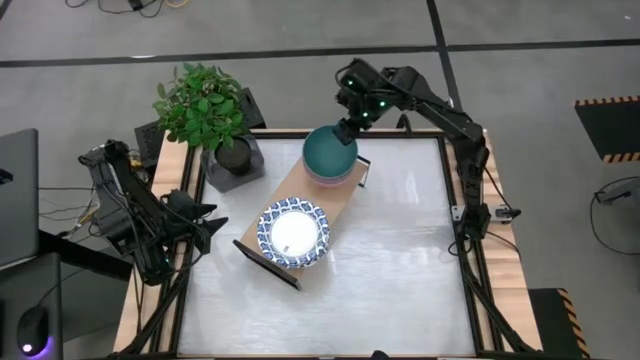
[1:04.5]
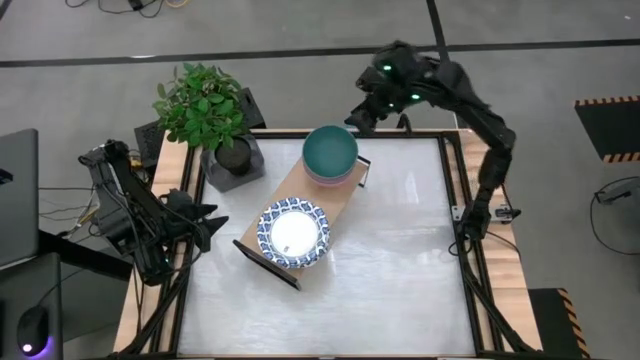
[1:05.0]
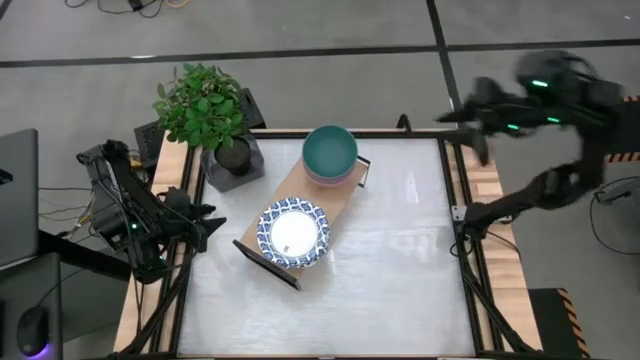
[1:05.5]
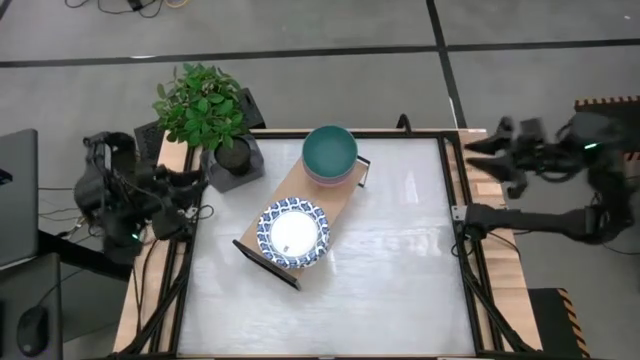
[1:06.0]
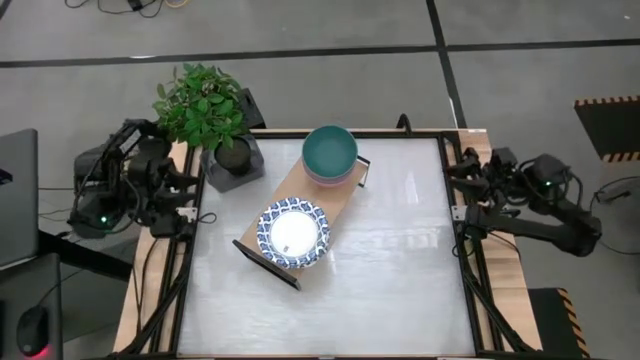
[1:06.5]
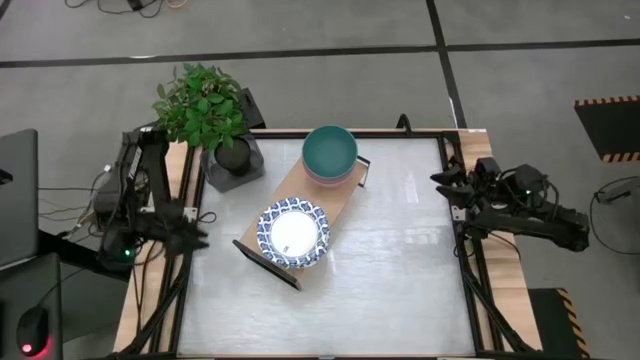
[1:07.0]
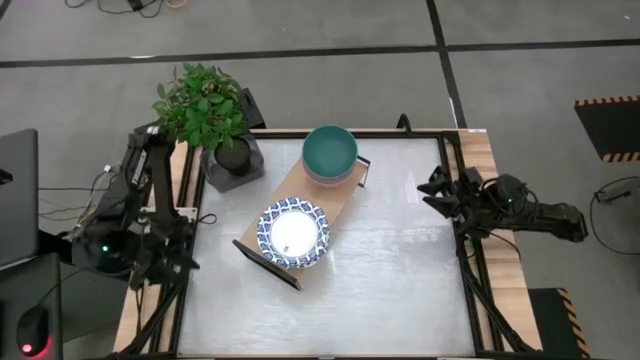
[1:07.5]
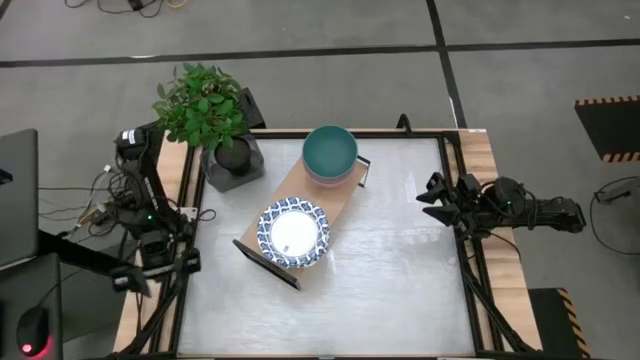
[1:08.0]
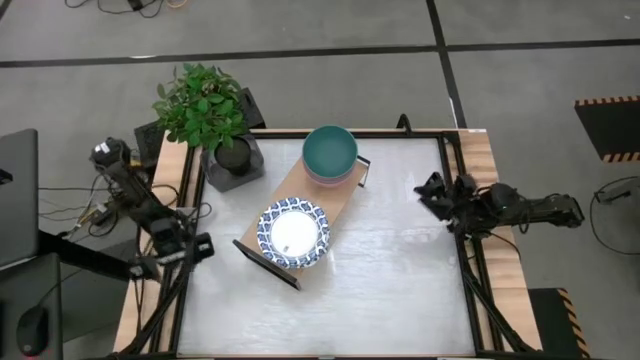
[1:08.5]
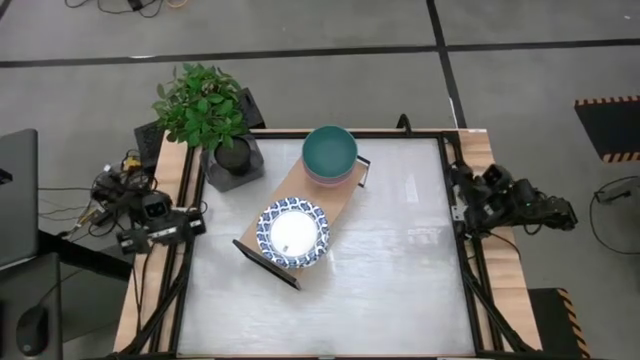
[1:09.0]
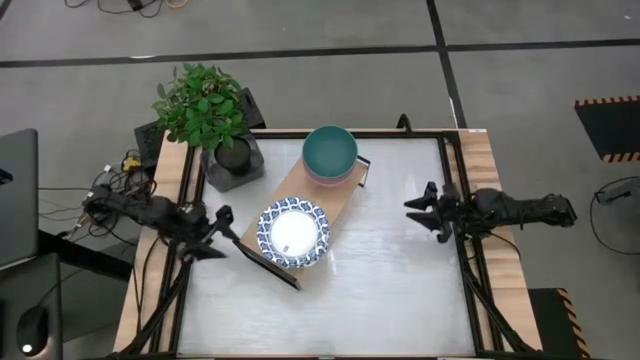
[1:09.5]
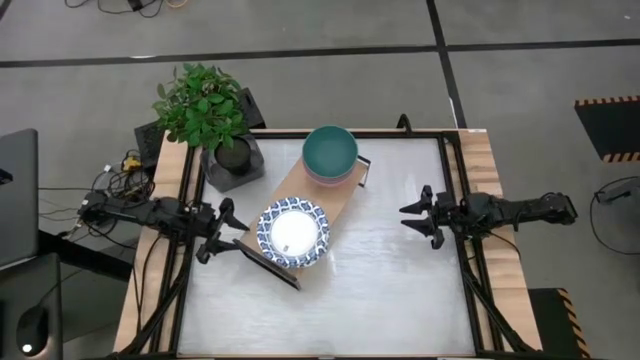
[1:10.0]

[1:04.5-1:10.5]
Task: Place and stack bowls onto a shelf
Adjust the shelf

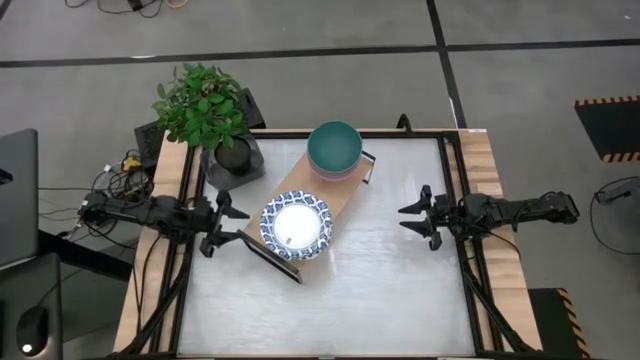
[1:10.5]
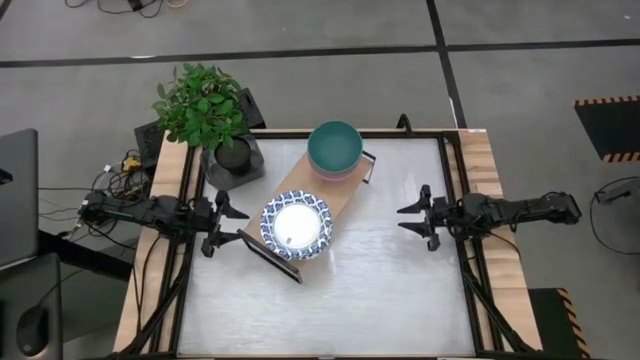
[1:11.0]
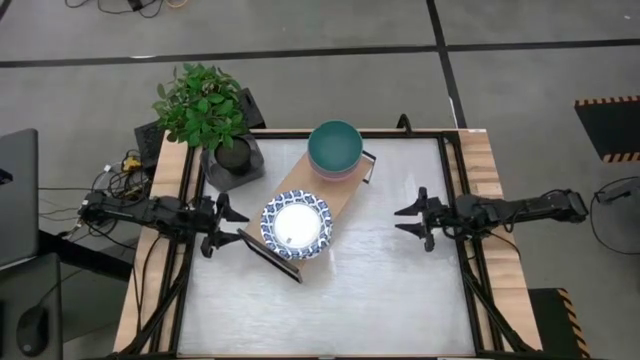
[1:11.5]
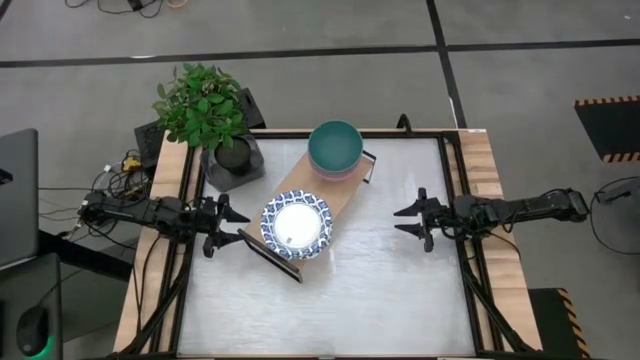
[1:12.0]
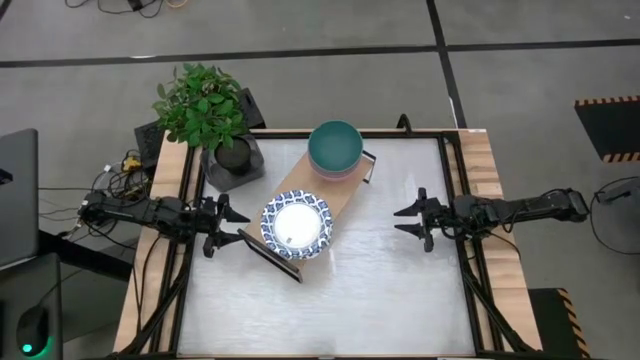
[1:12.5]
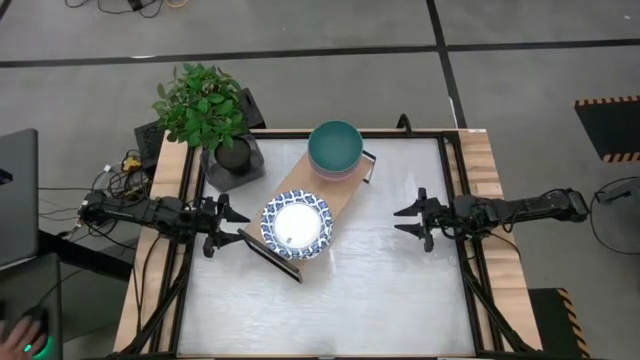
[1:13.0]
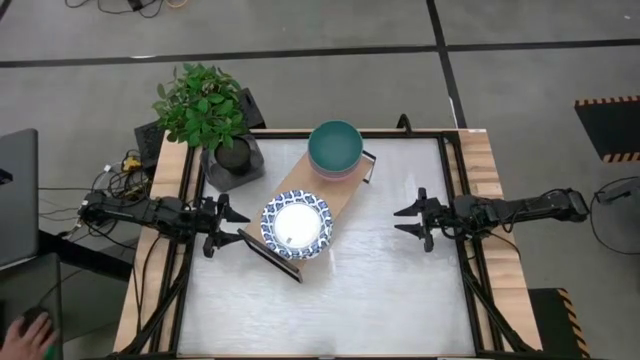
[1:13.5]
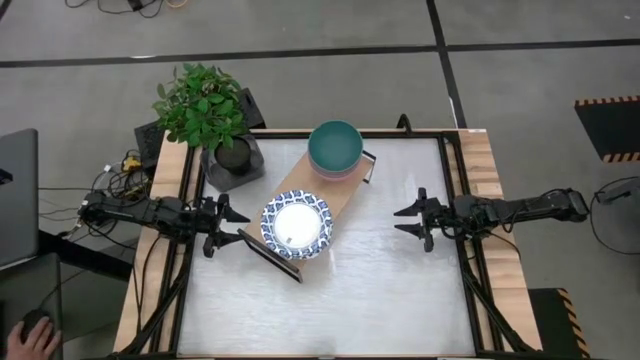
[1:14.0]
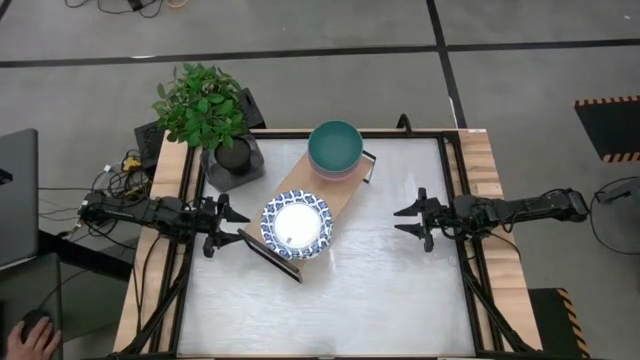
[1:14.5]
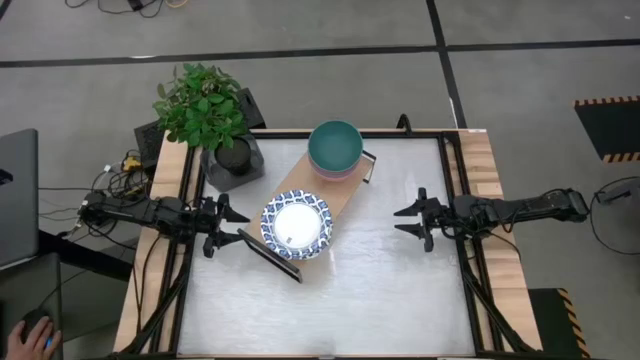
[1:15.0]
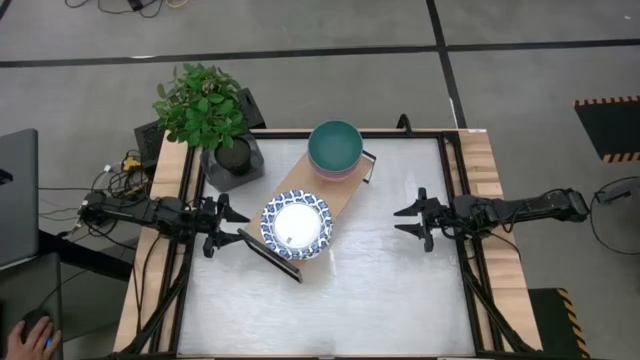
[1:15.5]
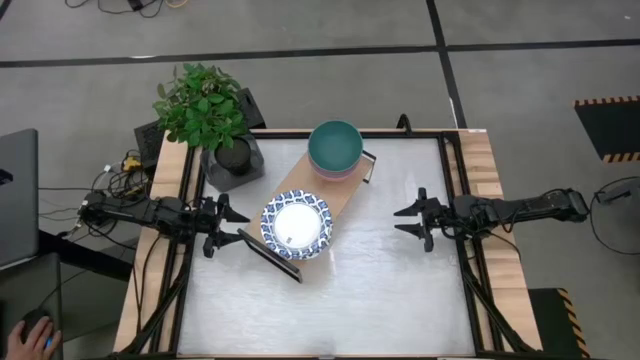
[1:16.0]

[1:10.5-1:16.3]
Return to Home Position

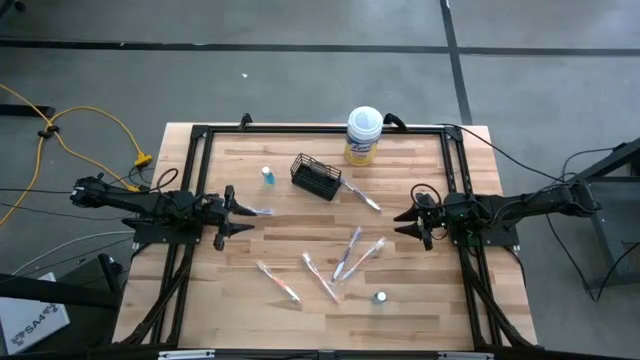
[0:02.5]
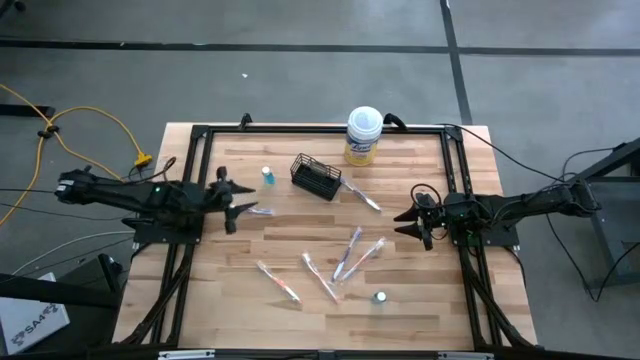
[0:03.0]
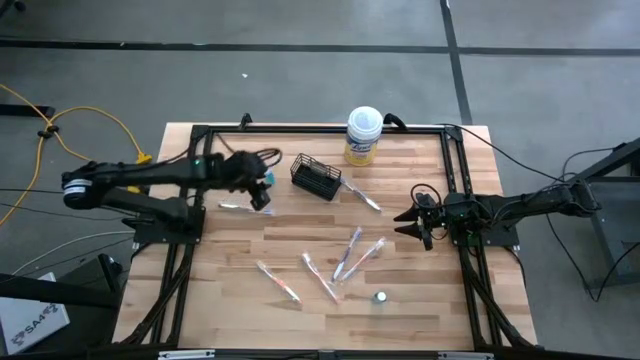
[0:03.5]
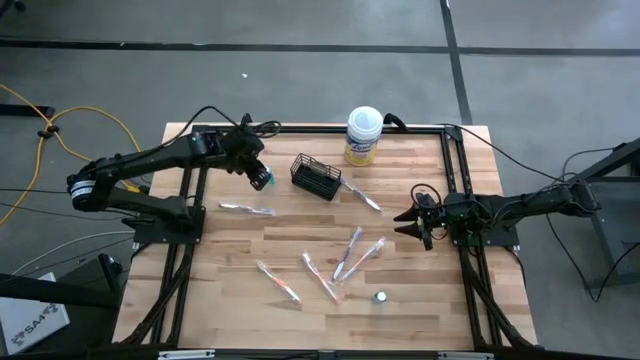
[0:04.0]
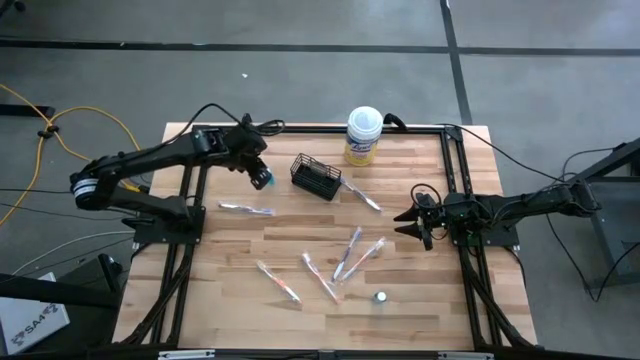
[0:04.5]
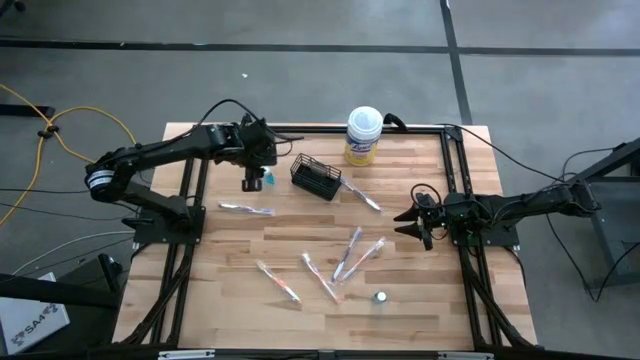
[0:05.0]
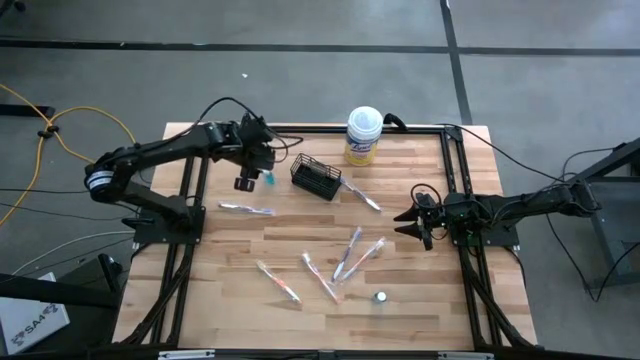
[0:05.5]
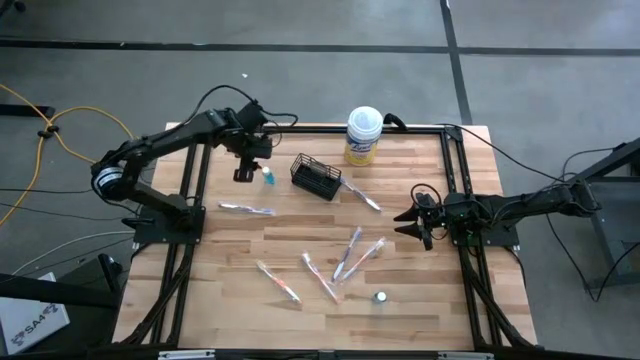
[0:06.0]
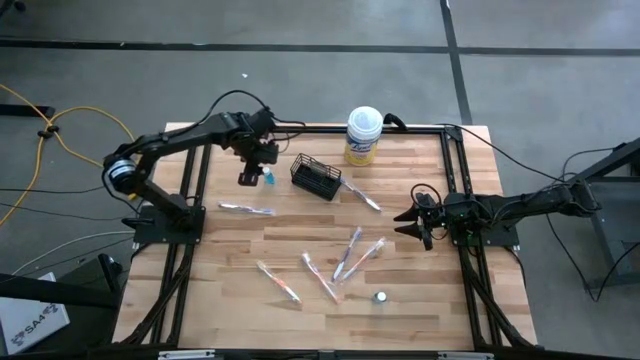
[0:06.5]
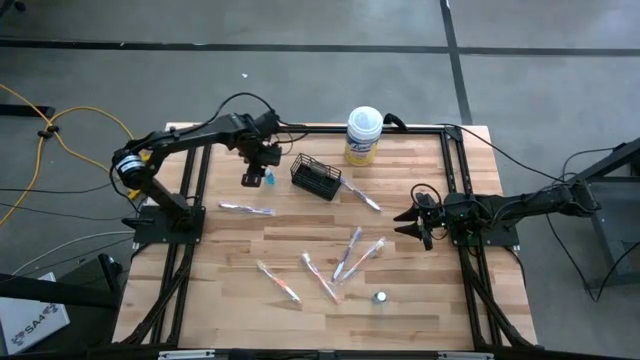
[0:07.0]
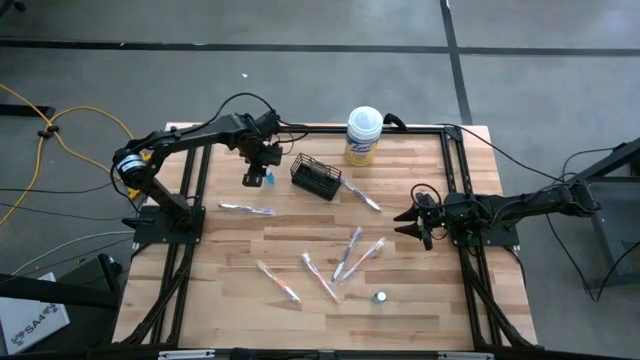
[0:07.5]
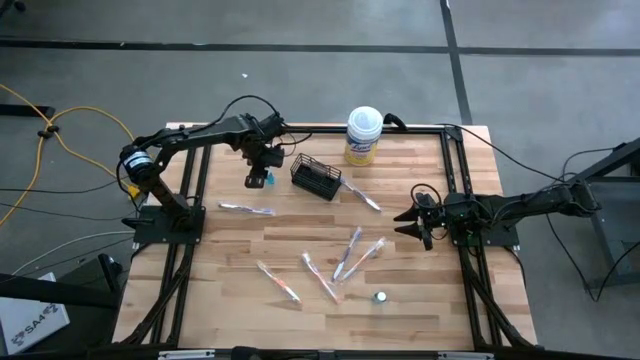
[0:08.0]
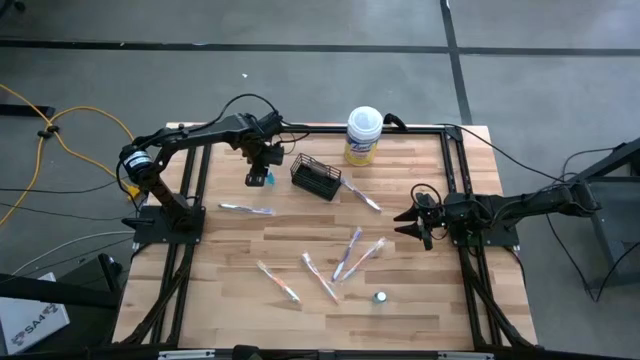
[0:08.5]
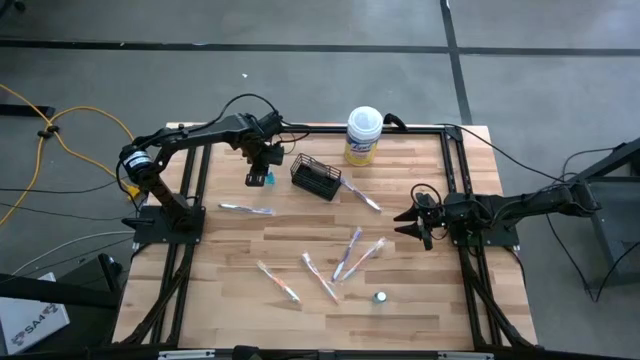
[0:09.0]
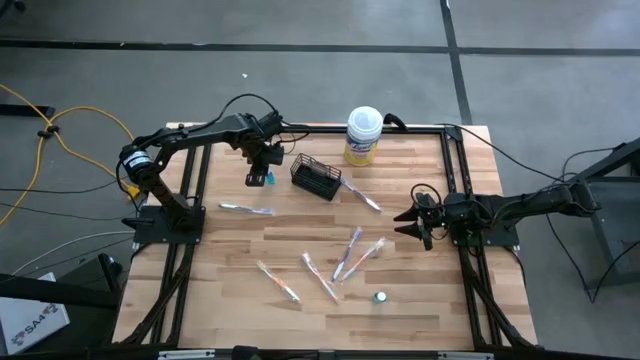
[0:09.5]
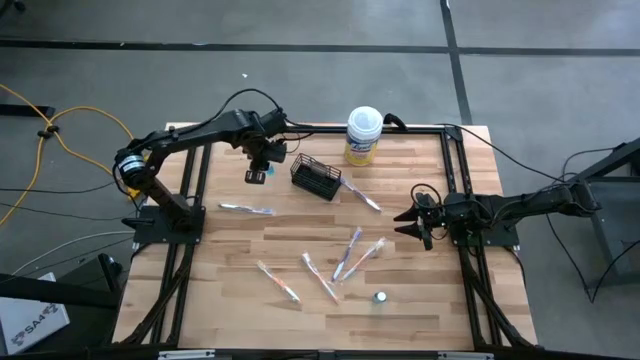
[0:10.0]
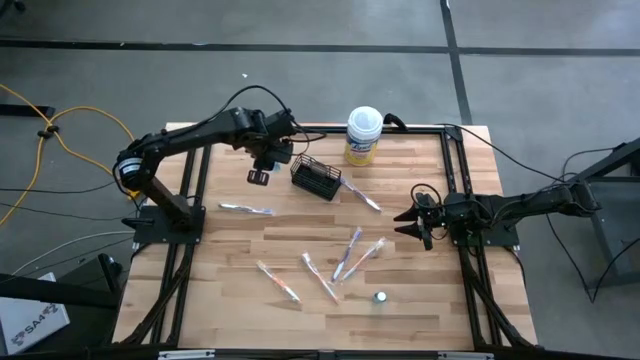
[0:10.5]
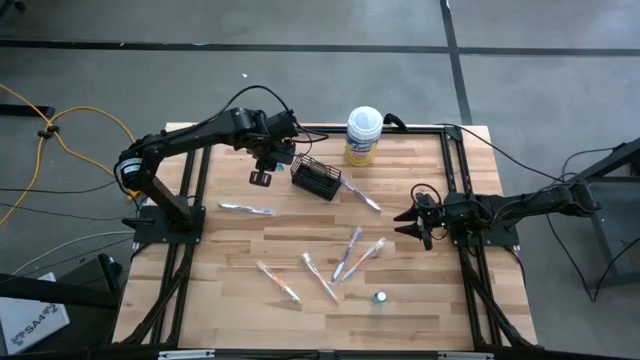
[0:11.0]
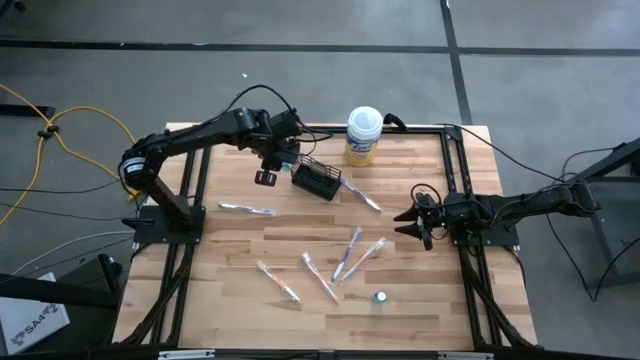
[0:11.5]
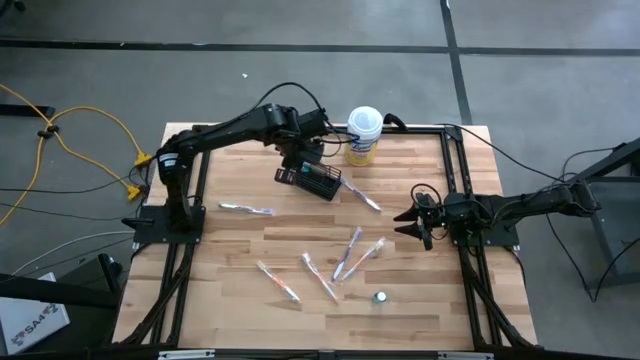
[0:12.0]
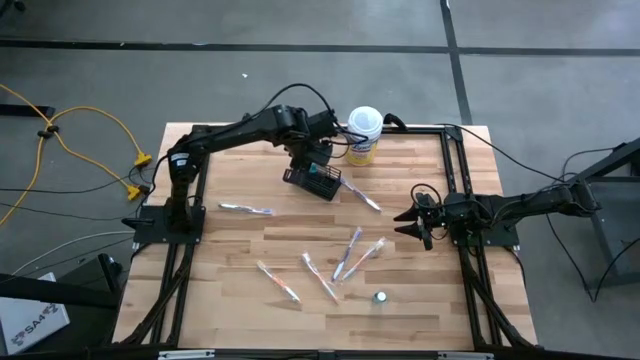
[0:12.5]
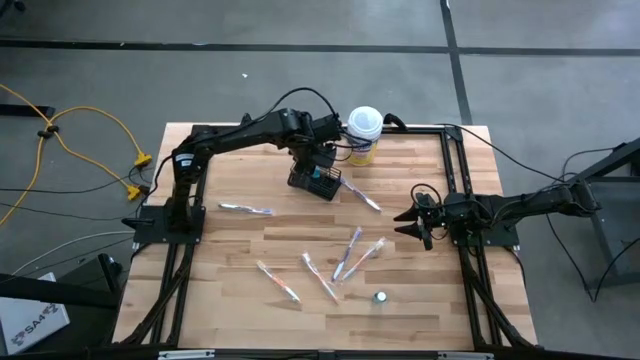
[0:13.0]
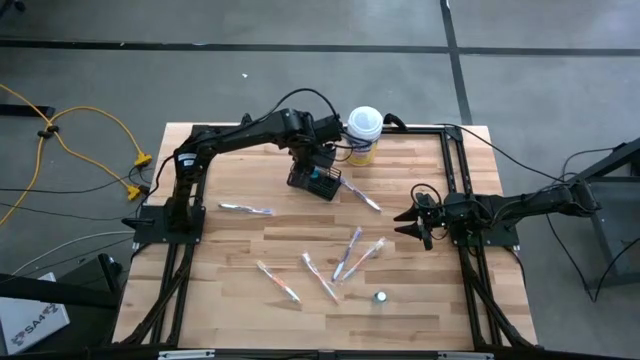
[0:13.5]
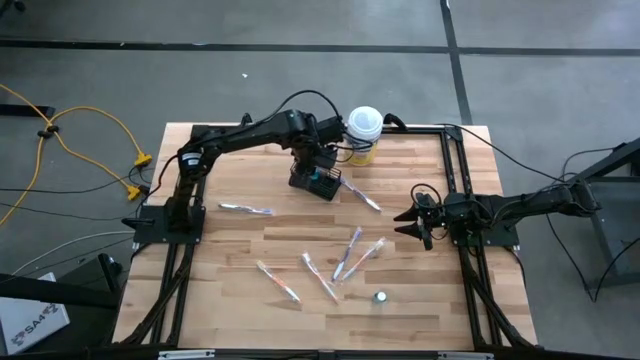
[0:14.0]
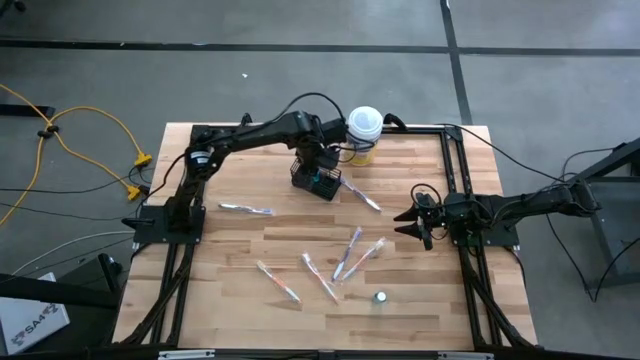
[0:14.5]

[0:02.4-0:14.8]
Task: Pick & Place toothbrushing station
Put the top blue mouthwash into the black mesh organizer
